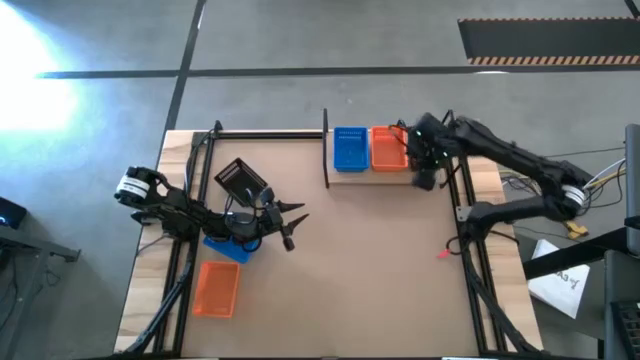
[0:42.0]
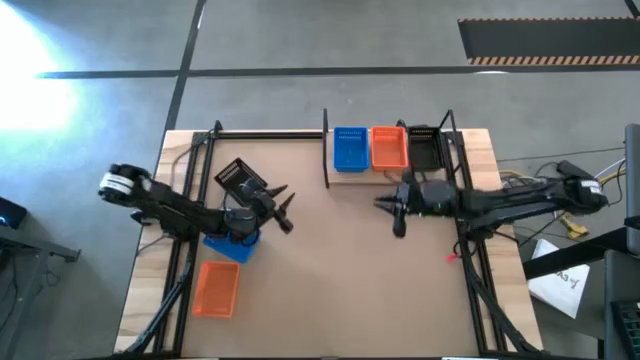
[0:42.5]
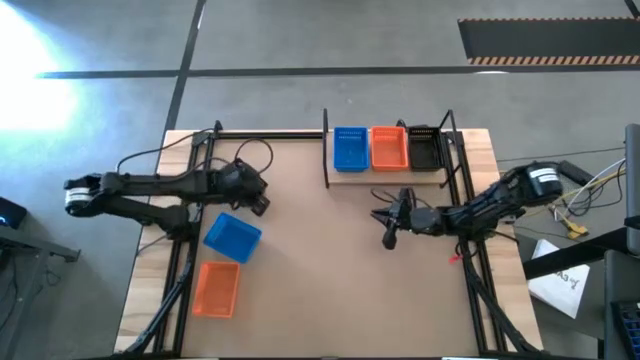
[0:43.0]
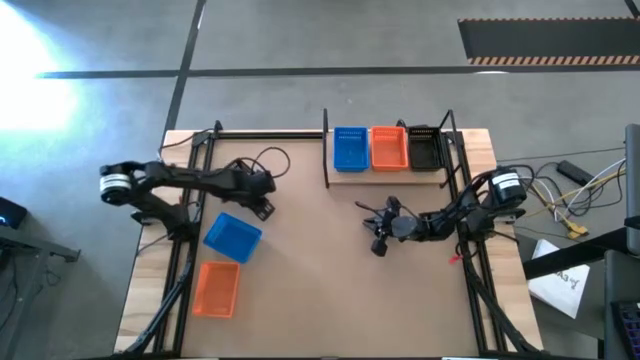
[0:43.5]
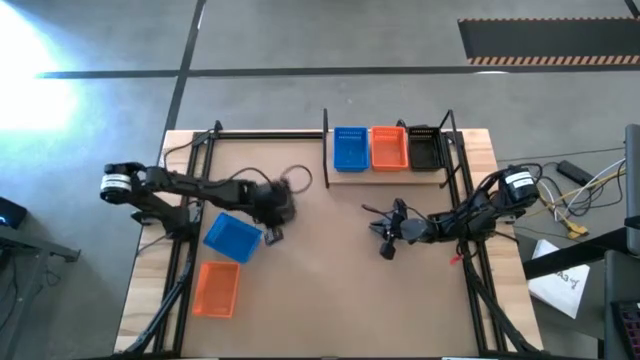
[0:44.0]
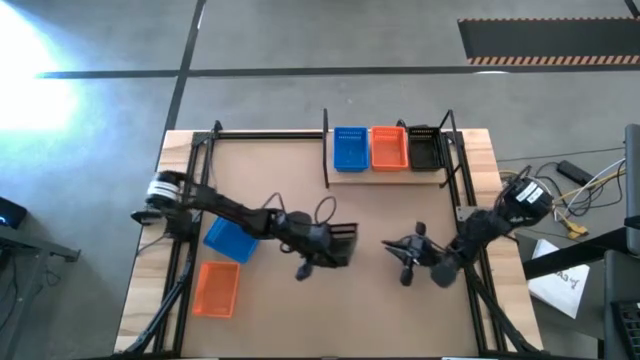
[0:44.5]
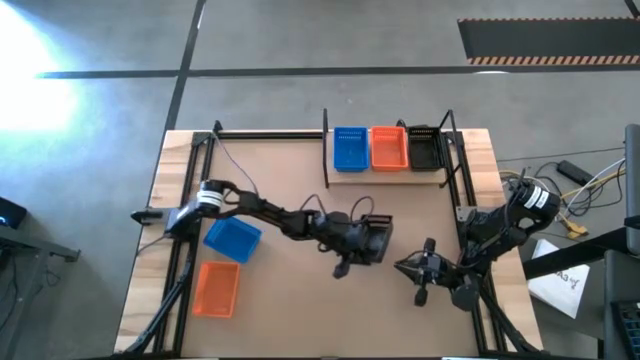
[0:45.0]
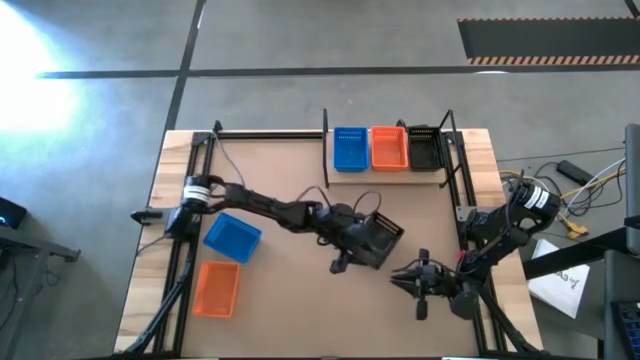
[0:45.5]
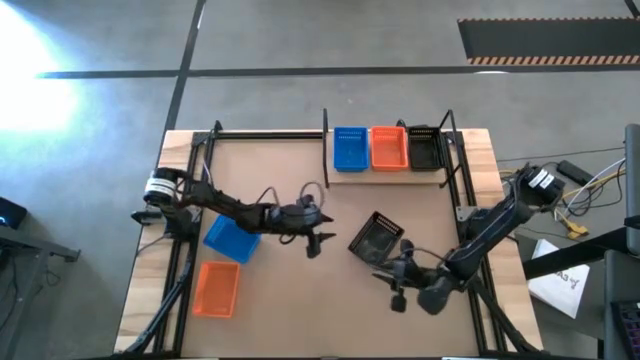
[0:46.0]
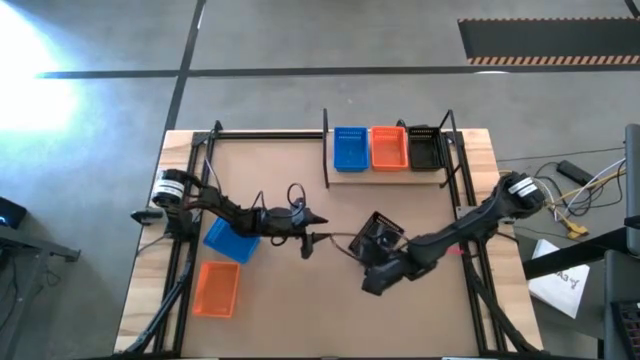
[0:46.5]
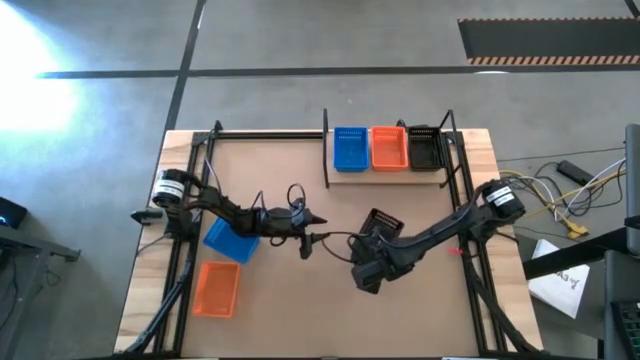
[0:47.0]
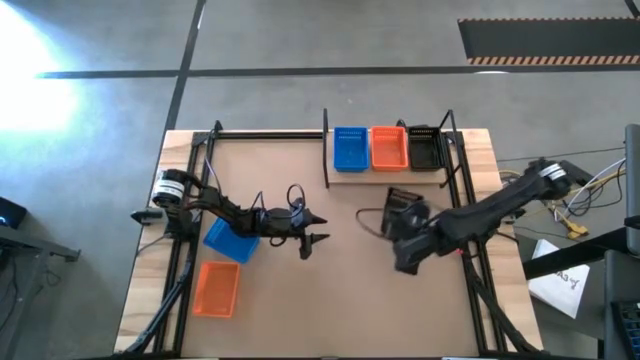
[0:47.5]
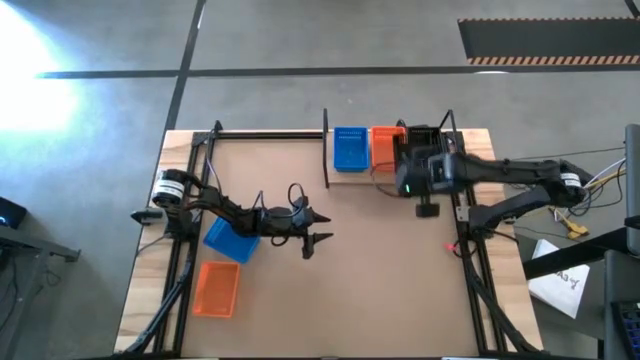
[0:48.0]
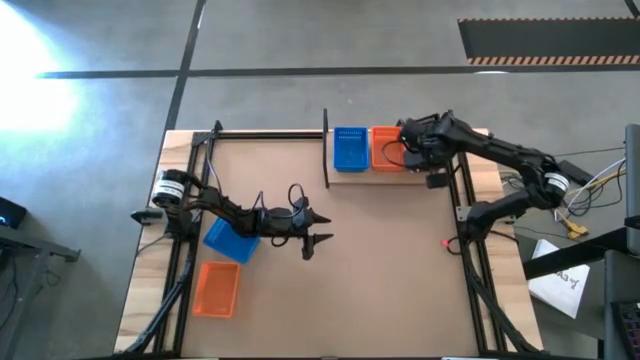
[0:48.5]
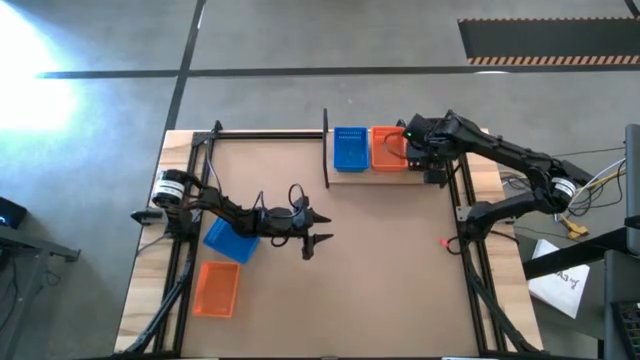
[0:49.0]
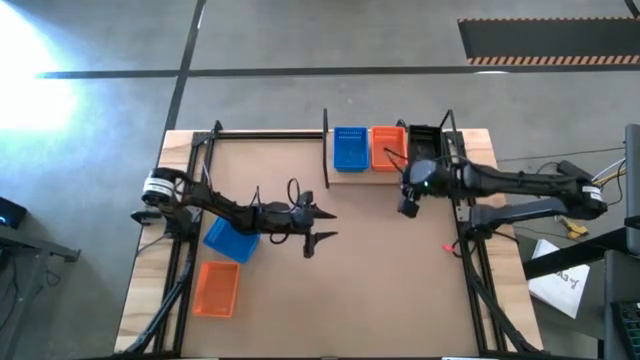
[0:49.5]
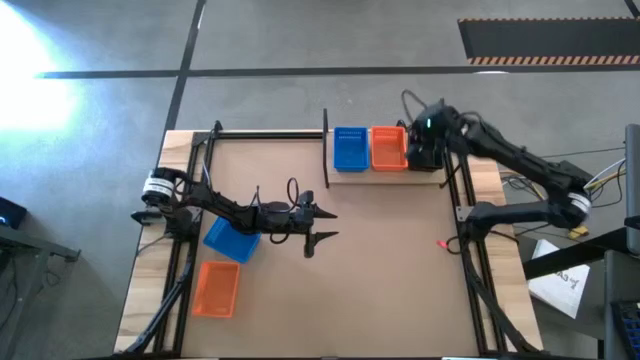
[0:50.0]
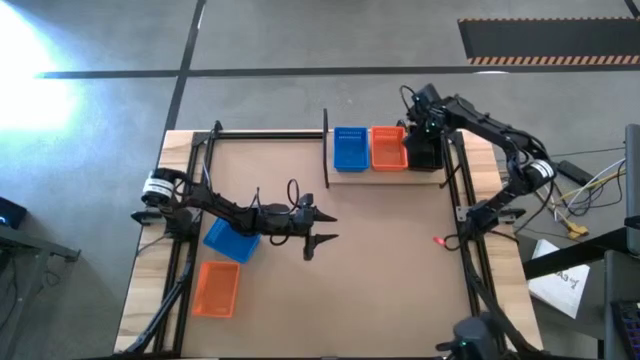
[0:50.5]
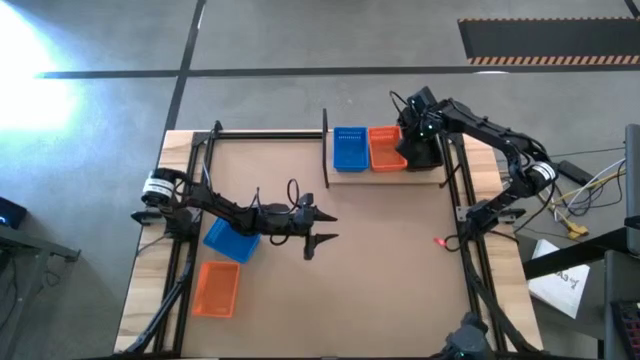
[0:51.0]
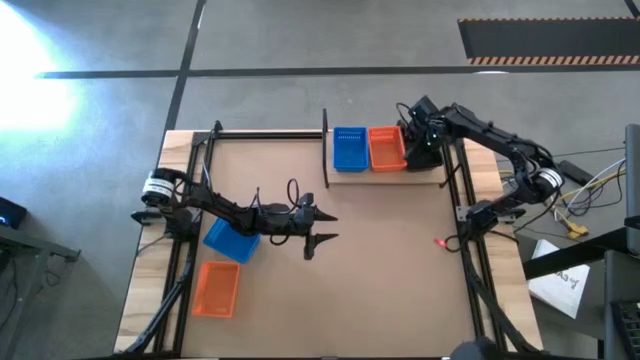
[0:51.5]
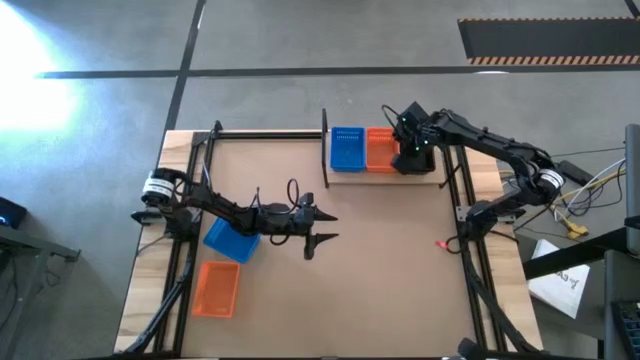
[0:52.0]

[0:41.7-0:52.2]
Task: Stack baskets on shelf by color
Stack the black basket on the other black basket on the shelf

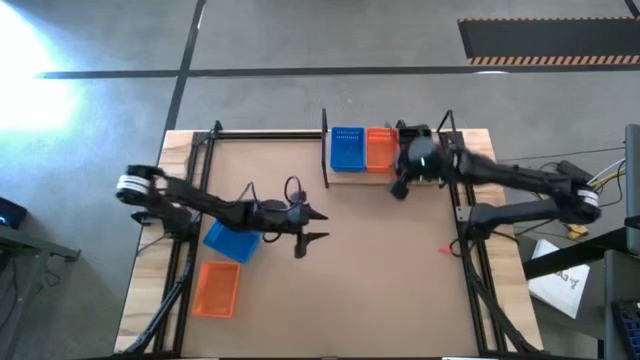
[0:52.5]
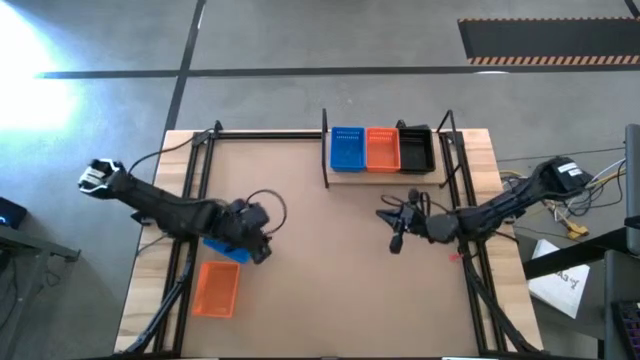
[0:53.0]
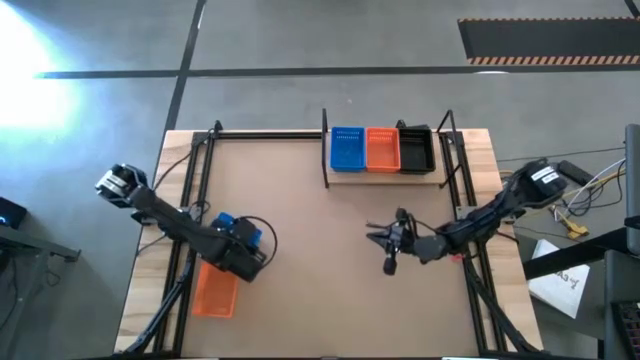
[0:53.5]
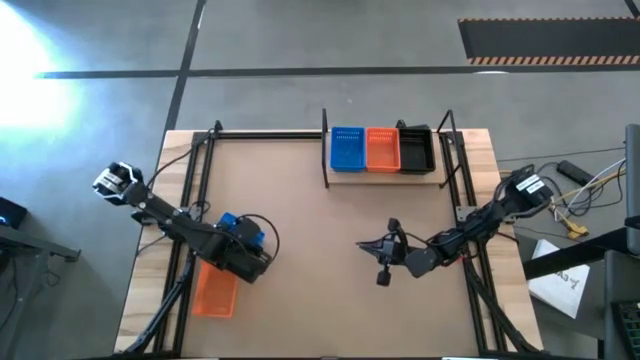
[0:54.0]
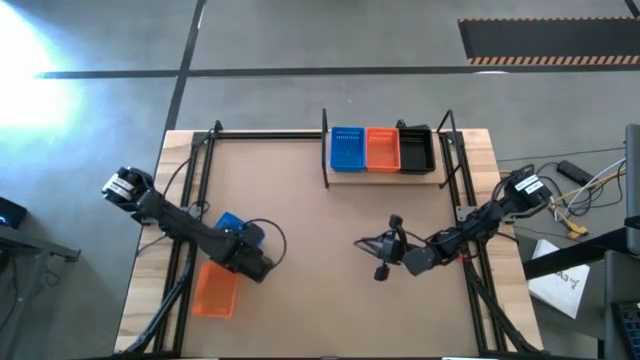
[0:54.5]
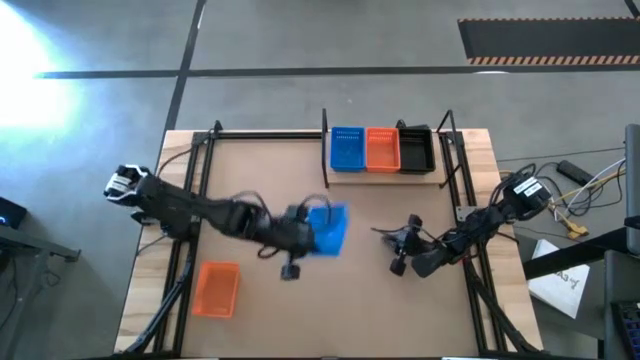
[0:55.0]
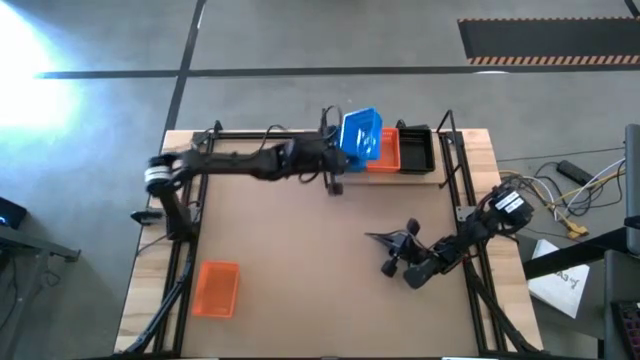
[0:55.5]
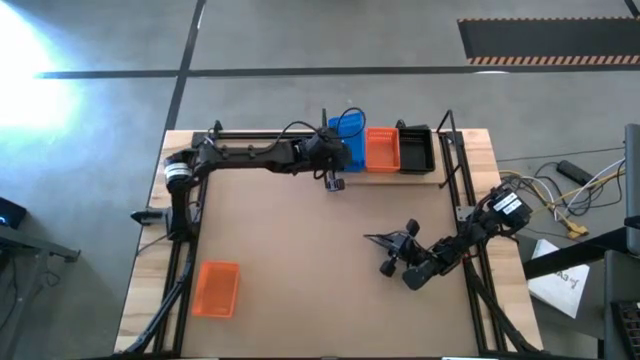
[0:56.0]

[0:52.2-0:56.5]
Stack the blue basket on the other blue basket on the shelf

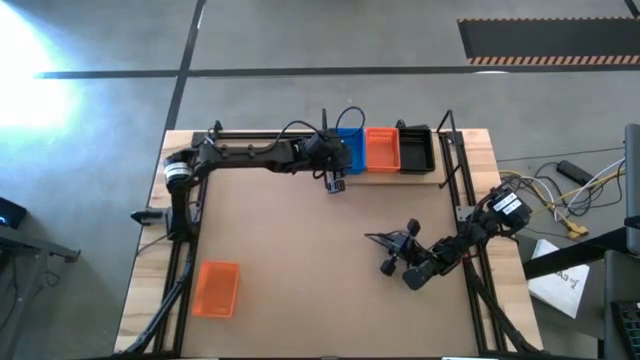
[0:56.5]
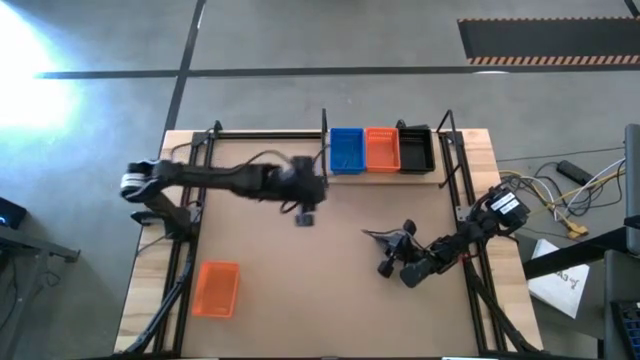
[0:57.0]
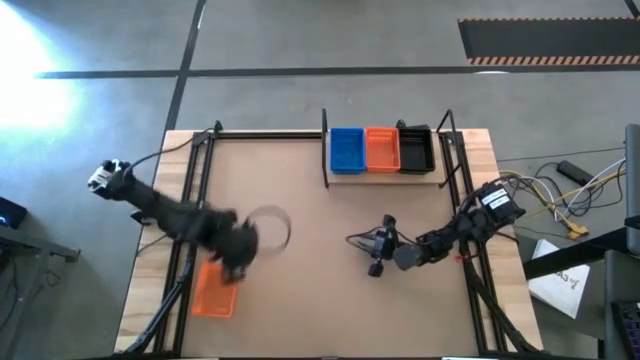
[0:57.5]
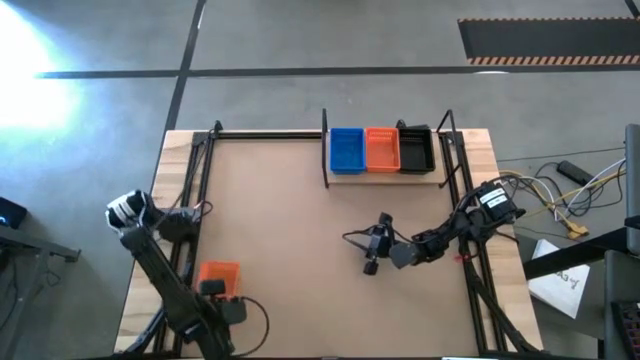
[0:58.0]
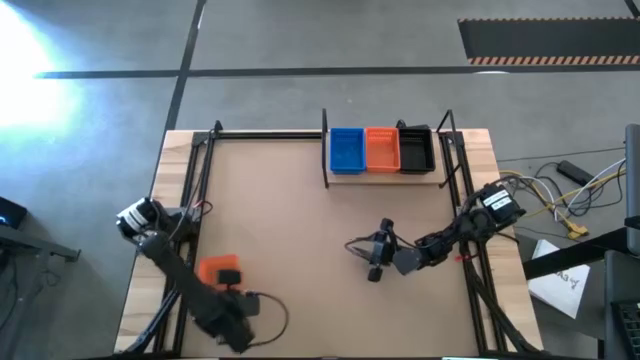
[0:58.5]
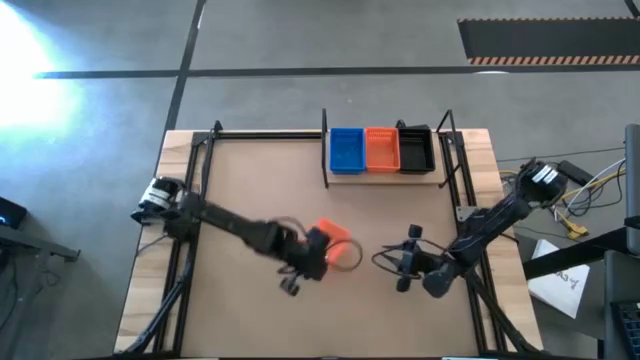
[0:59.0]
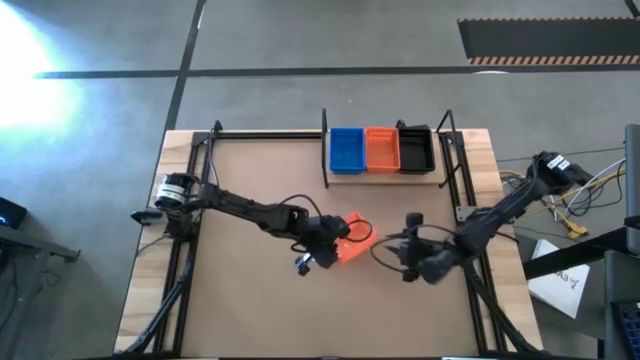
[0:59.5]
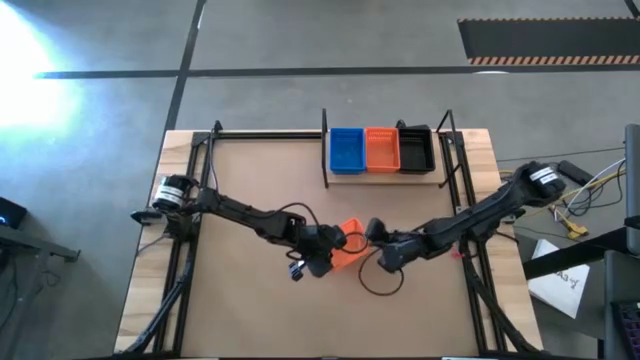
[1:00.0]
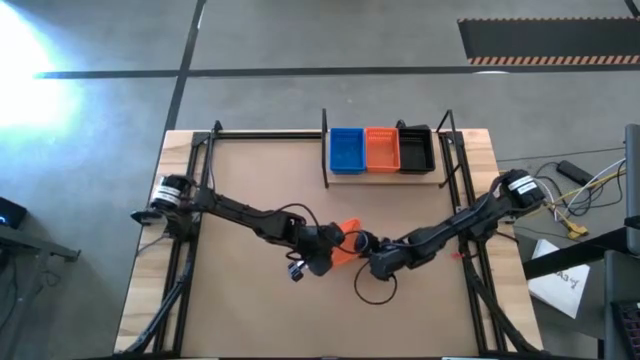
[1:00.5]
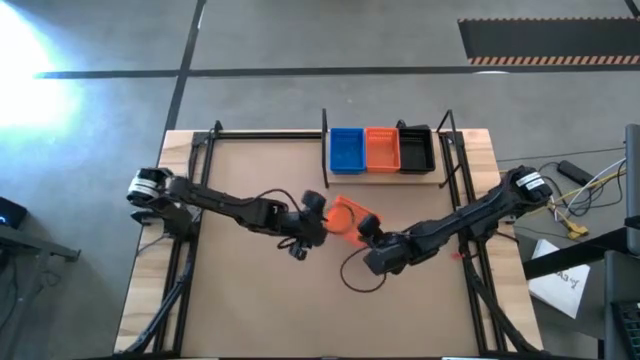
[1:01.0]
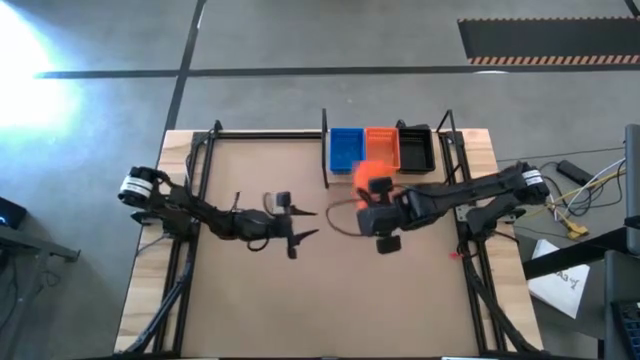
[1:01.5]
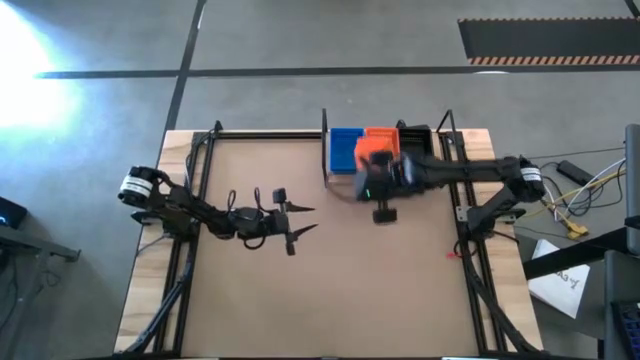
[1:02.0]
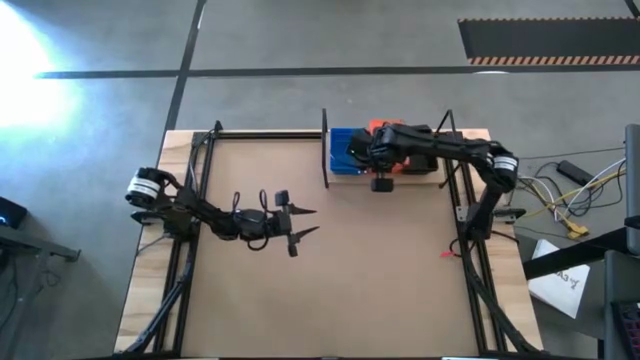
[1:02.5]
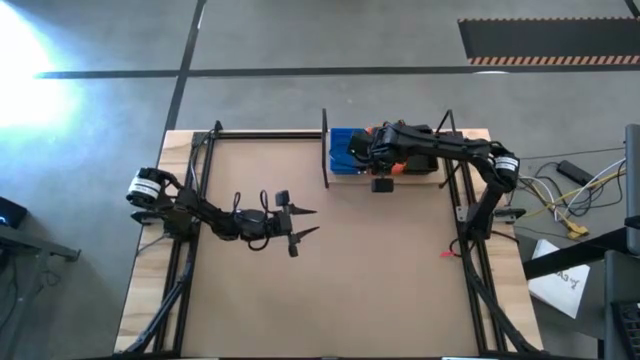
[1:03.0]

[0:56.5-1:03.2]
Stack the orange basket on the other orange basket on the shelf
